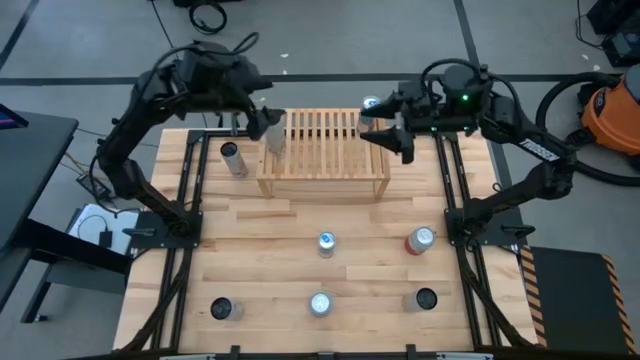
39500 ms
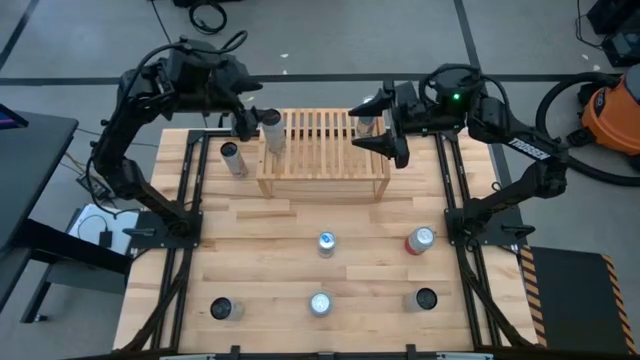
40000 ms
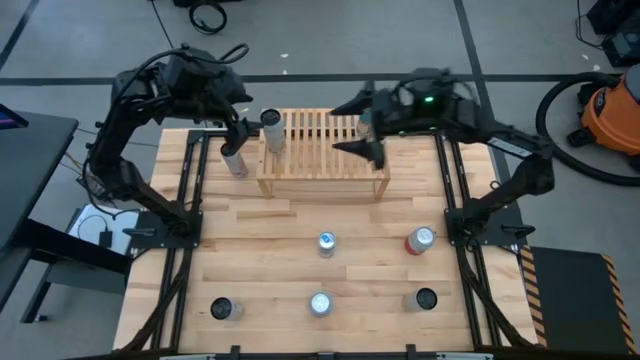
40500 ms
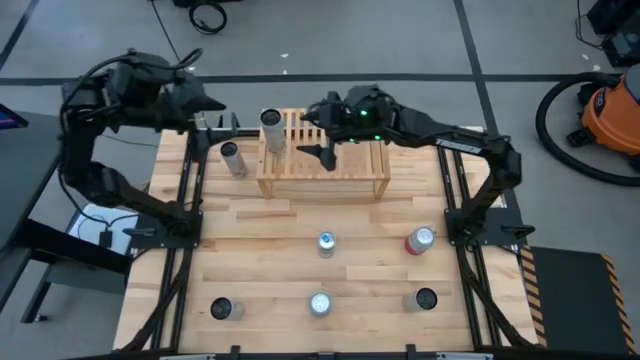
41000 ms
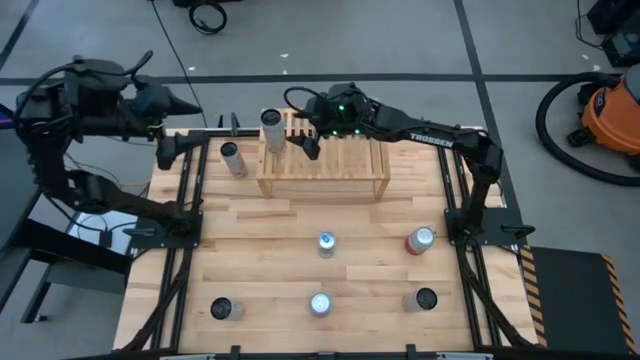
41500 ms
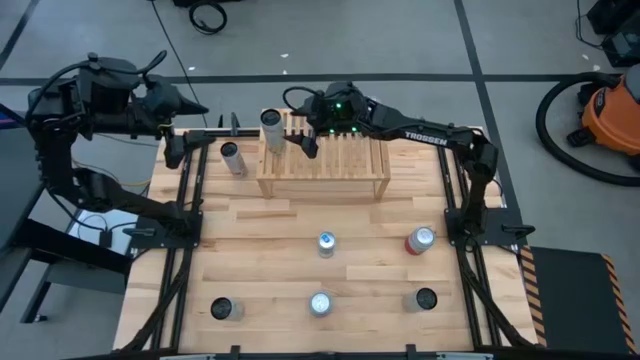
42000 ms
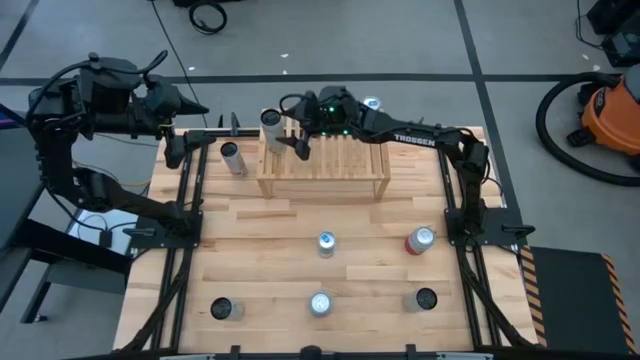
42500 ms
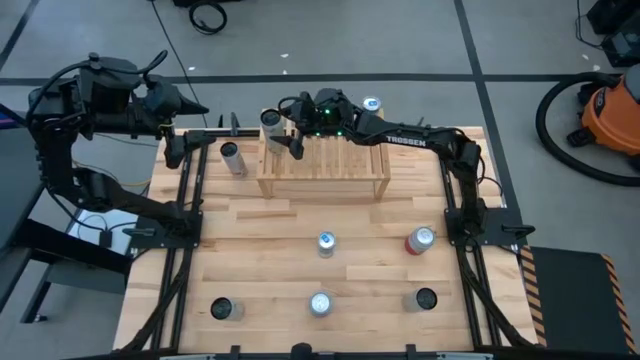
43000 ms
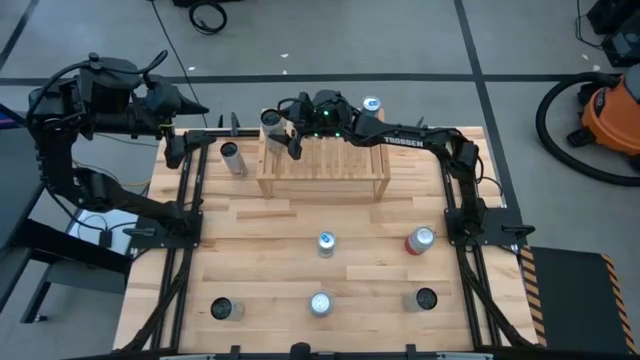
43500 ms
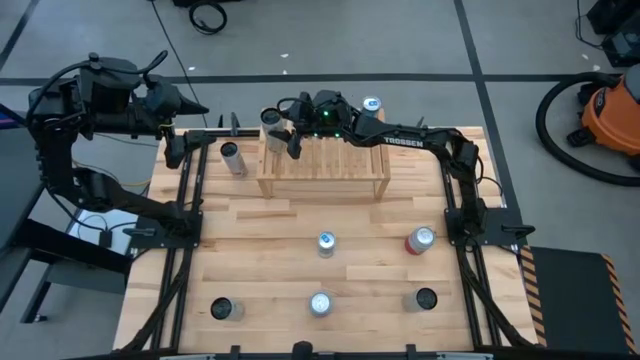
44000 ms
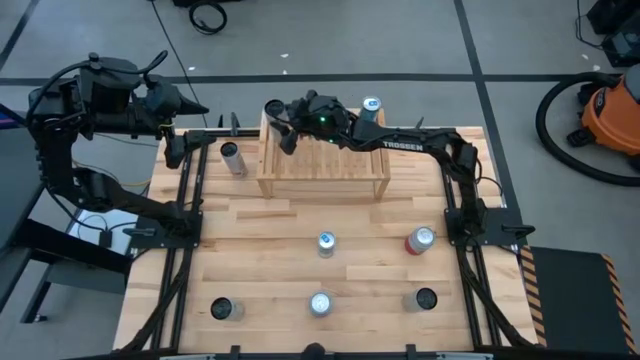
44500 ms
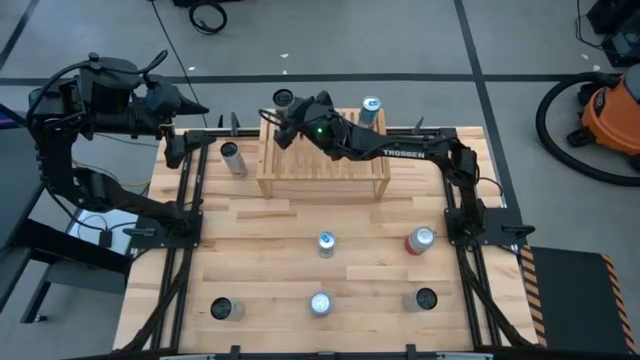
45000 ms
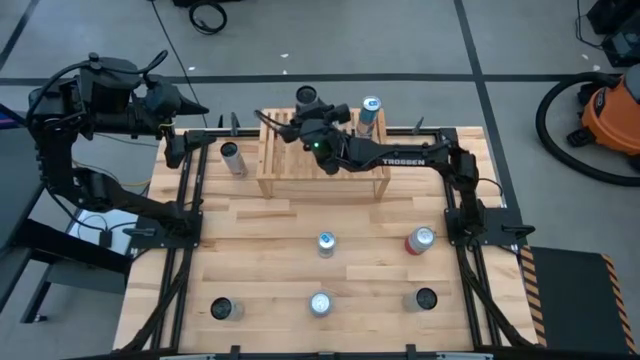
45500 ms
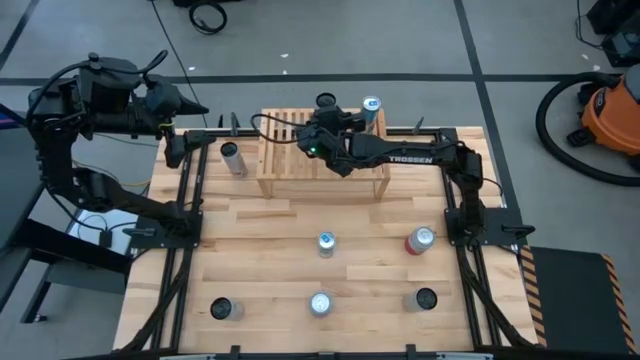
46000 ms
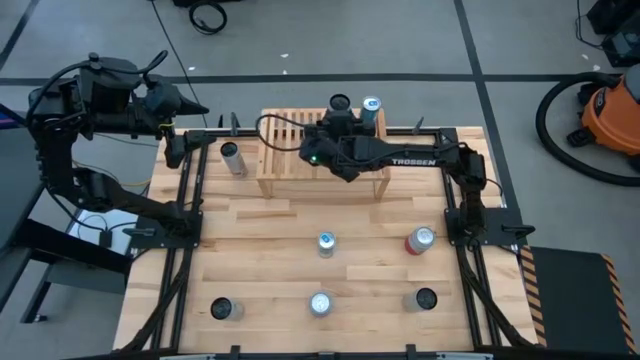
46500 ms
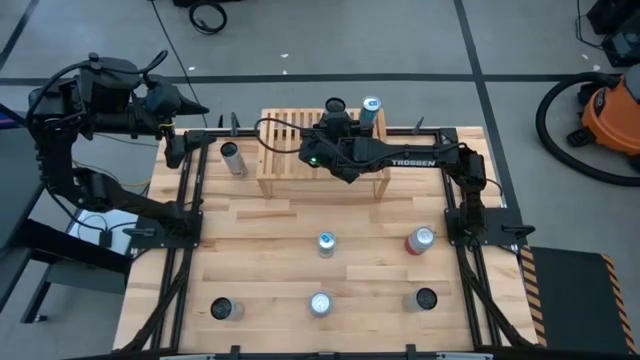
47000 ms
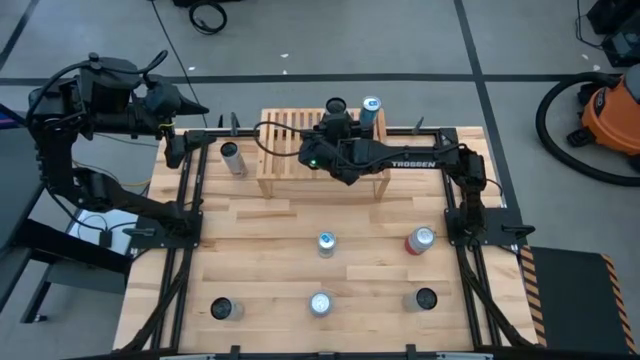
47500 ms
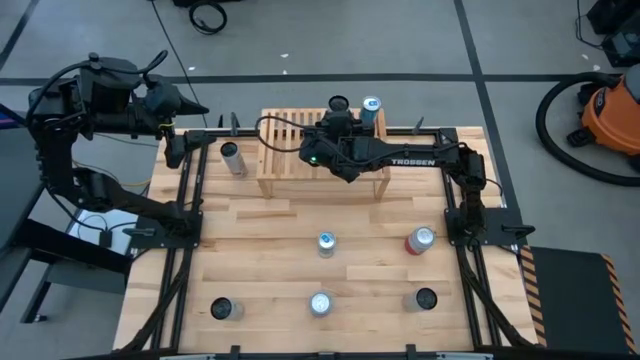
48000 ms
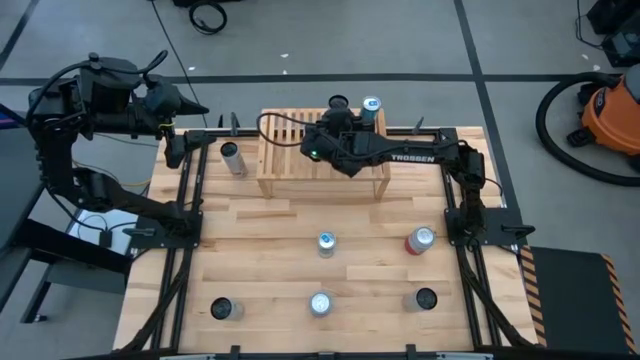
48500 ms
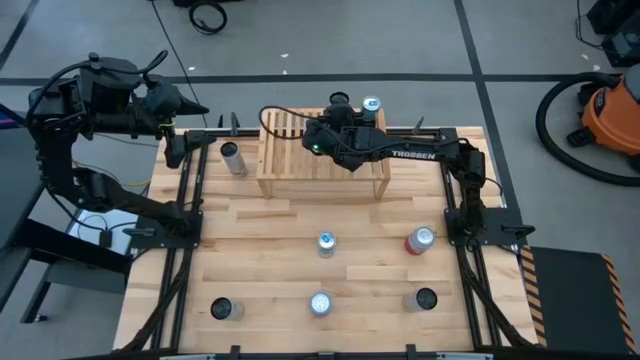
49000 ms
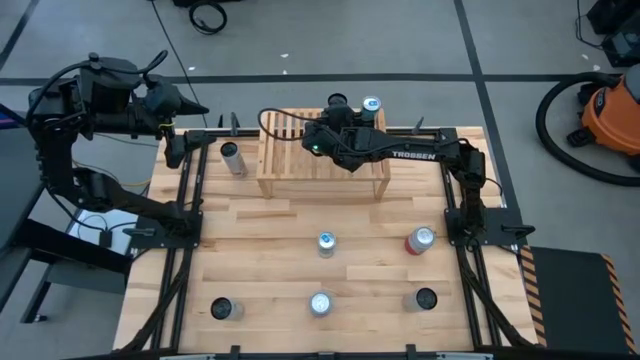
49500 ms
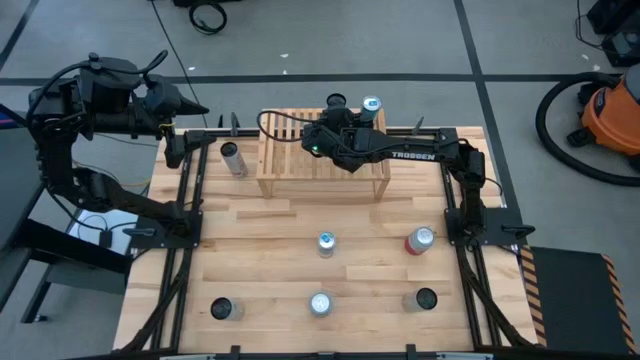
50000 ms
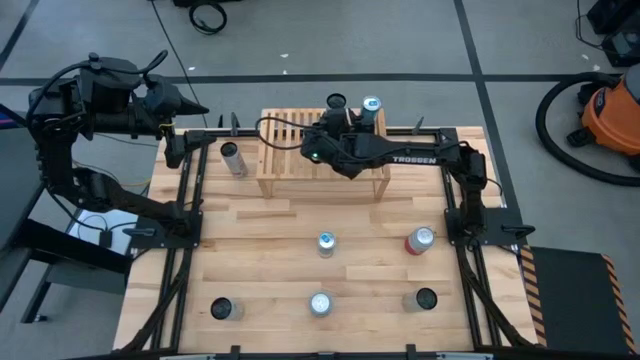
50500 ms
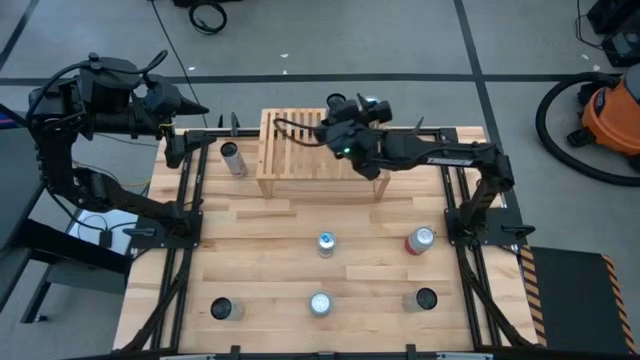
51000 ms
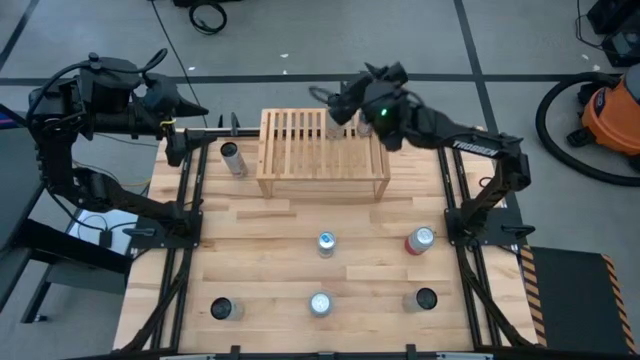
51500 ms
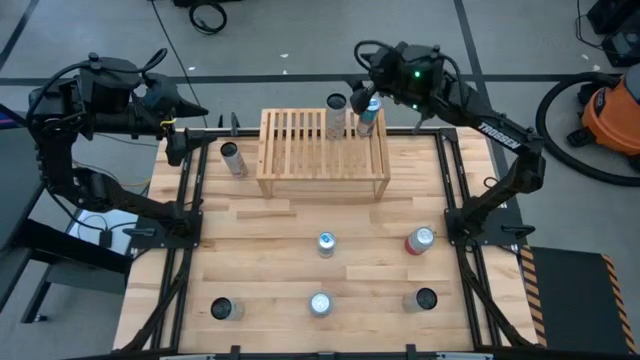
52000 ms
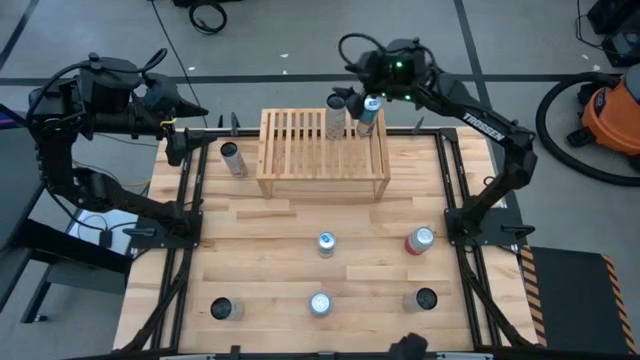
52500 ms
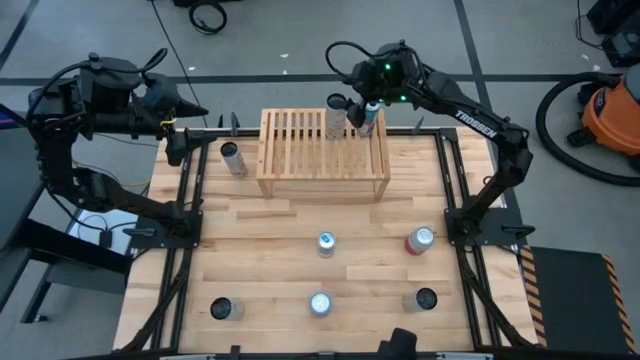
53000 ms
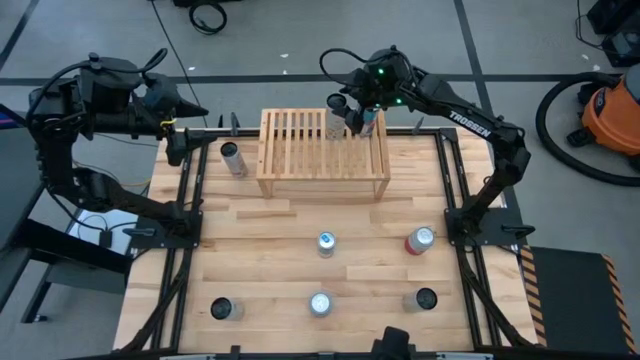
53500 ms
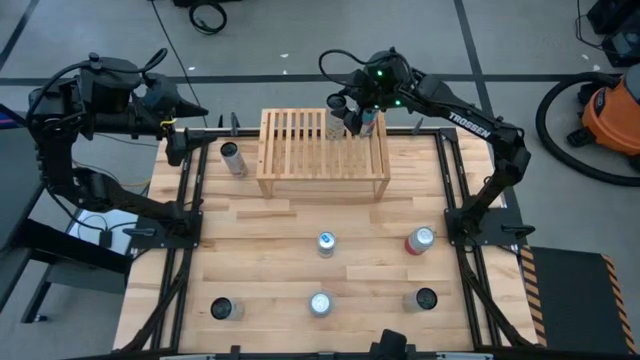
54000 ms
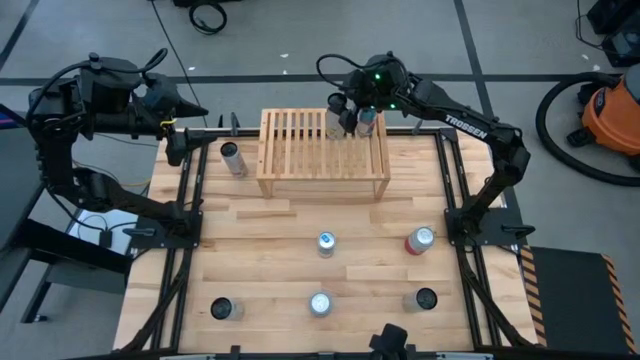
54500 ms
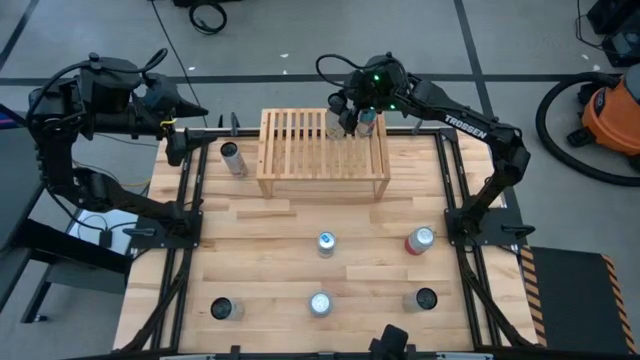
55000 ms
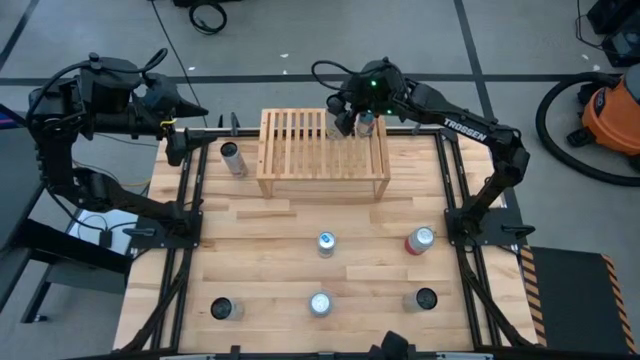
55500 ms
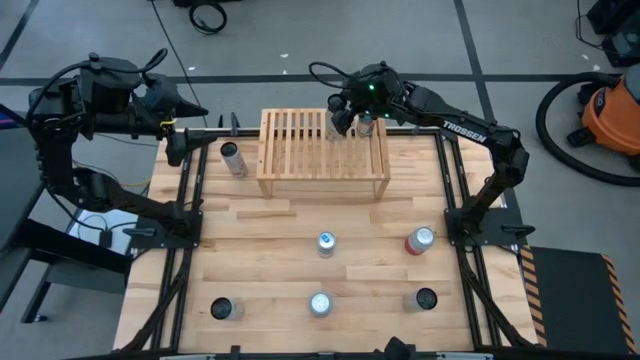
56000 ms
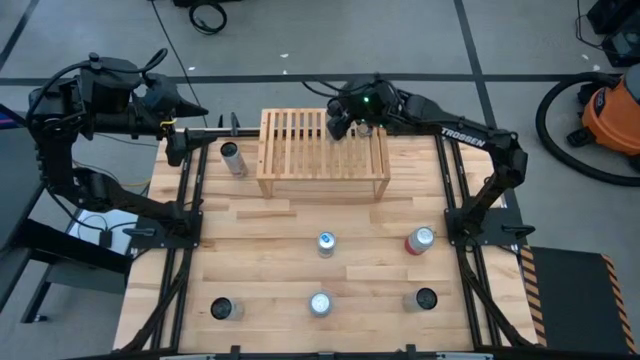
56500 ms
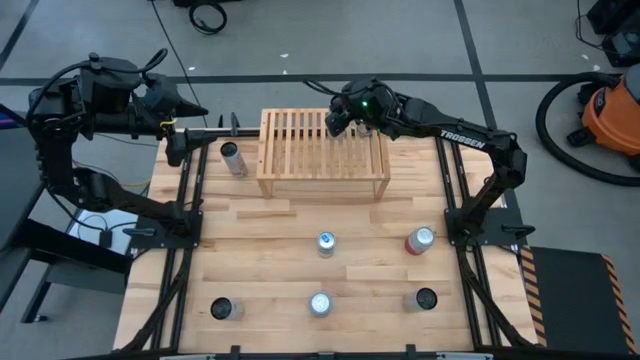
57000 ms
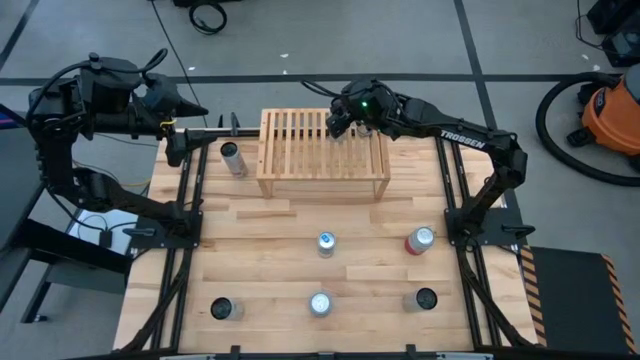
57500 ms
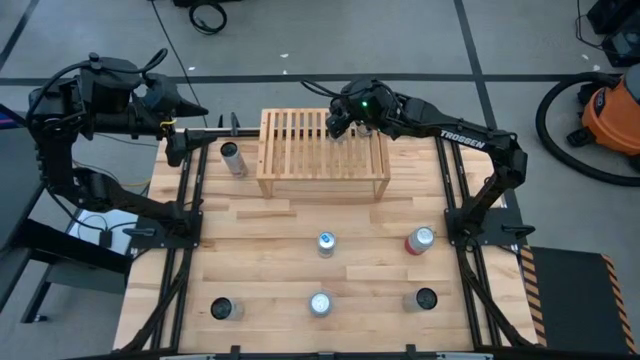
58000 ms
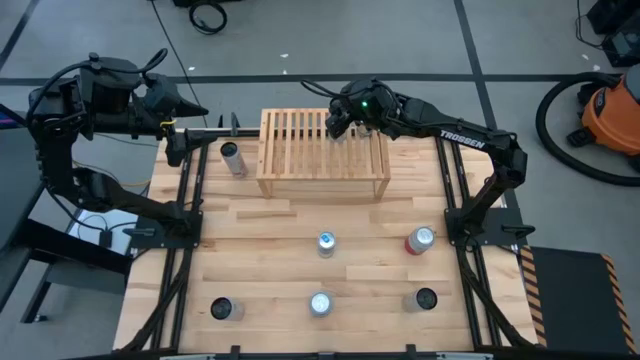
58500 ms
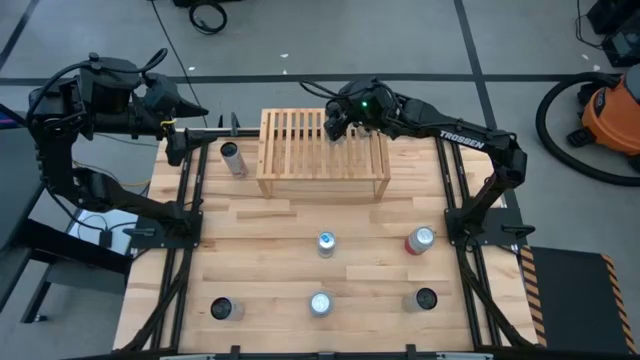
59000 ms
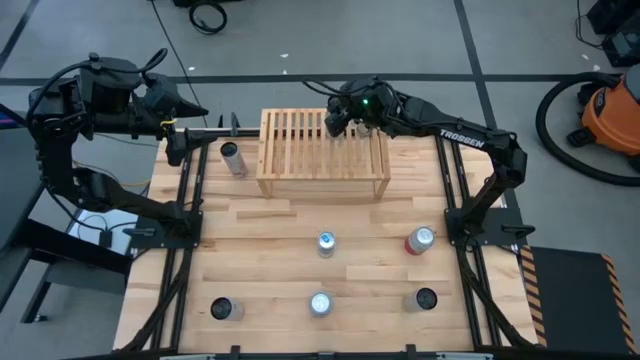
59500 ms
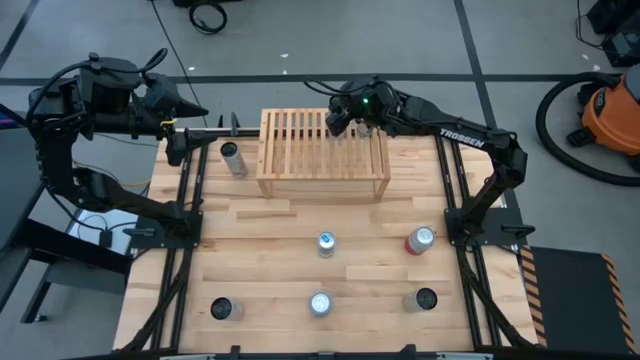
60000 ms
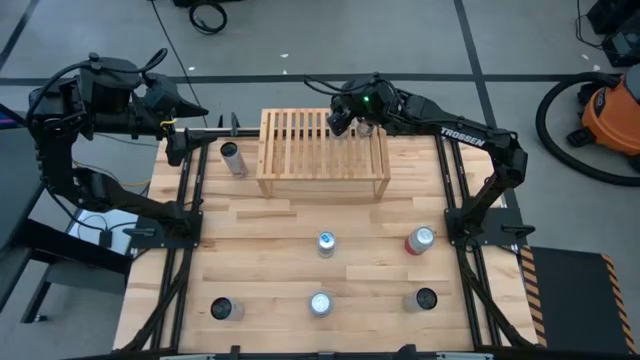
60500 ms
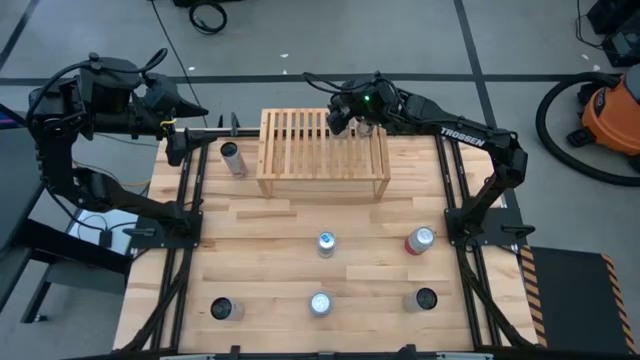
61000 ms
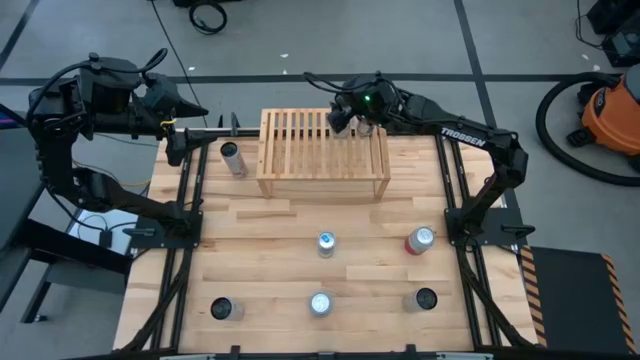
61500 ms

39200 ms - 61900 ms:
Task: Place canned beverage on shelf
Put the left white and yellow soda can on the shelf
